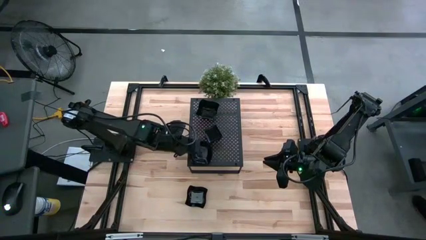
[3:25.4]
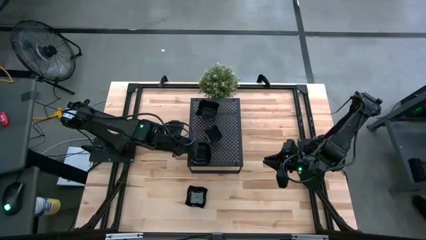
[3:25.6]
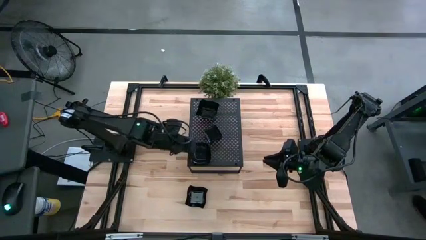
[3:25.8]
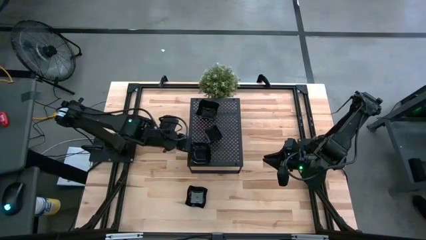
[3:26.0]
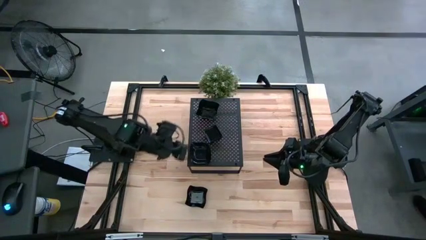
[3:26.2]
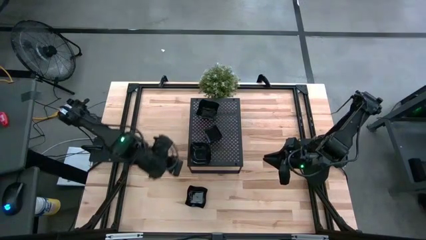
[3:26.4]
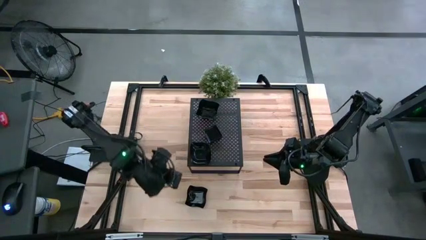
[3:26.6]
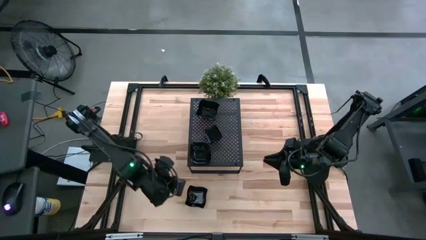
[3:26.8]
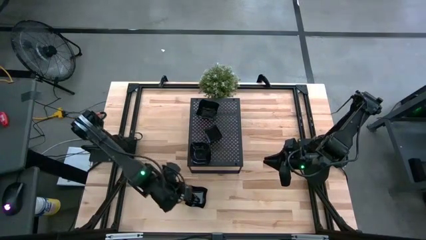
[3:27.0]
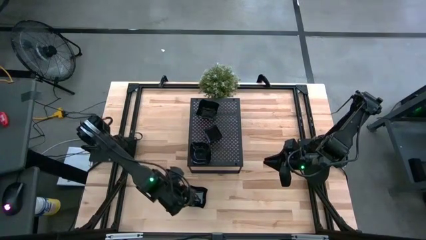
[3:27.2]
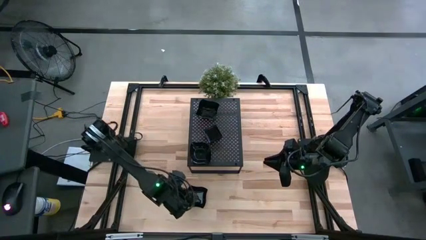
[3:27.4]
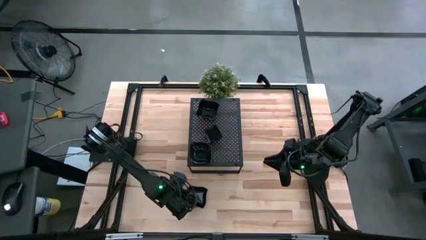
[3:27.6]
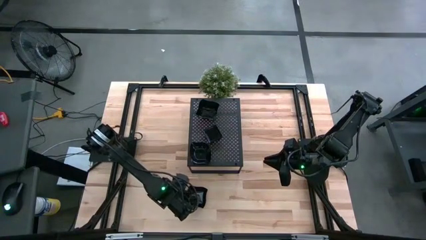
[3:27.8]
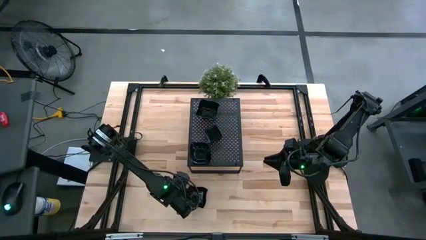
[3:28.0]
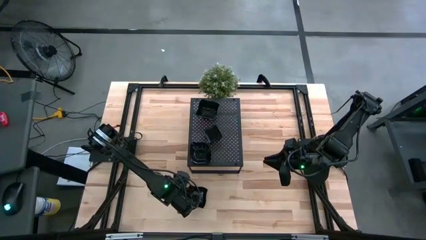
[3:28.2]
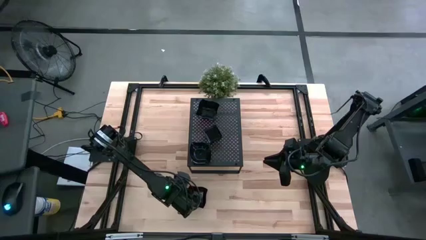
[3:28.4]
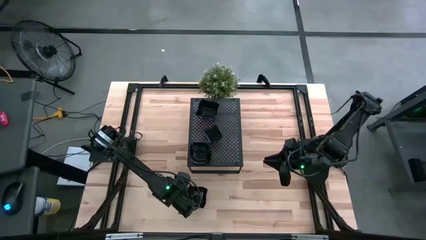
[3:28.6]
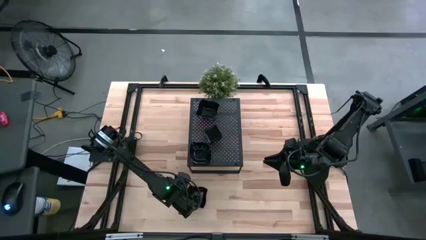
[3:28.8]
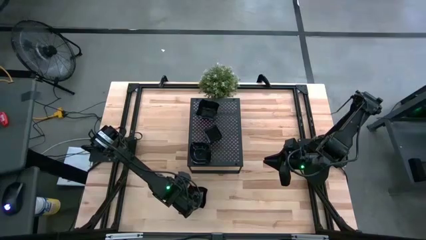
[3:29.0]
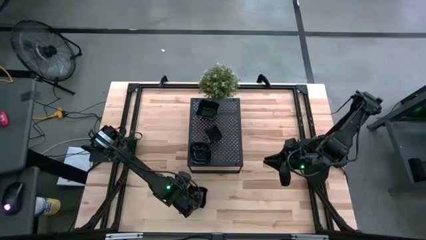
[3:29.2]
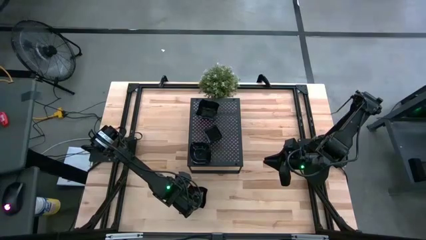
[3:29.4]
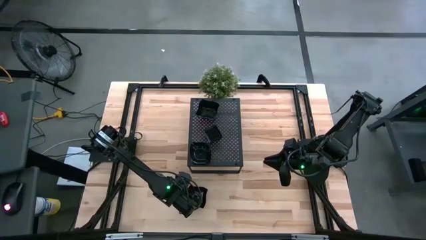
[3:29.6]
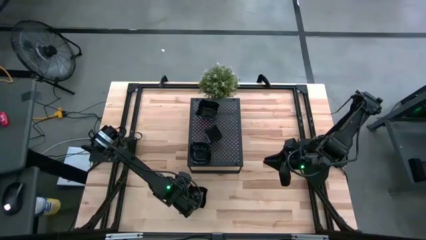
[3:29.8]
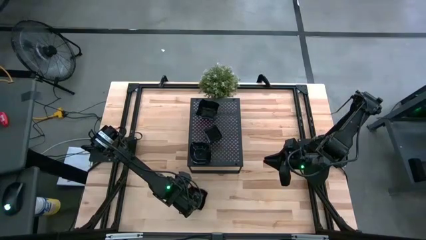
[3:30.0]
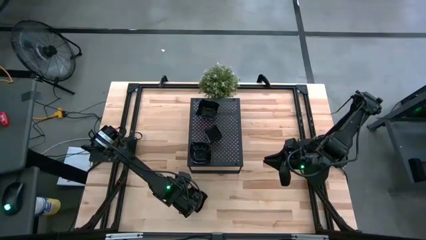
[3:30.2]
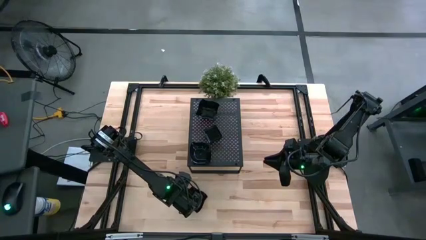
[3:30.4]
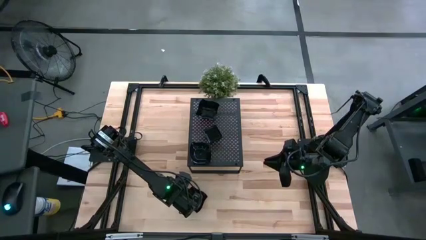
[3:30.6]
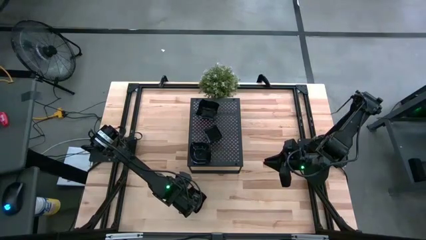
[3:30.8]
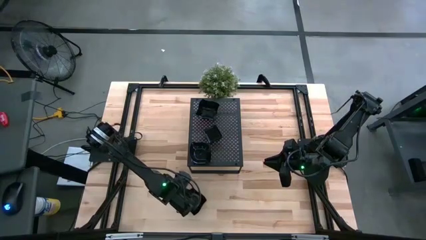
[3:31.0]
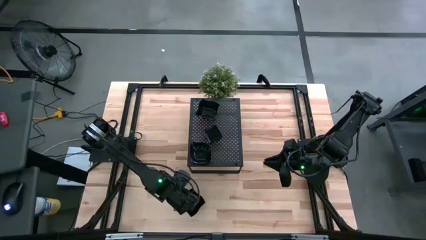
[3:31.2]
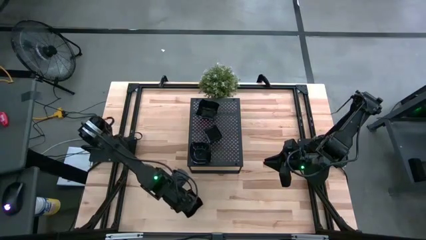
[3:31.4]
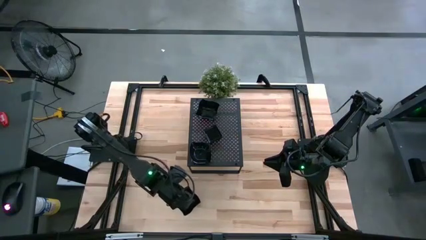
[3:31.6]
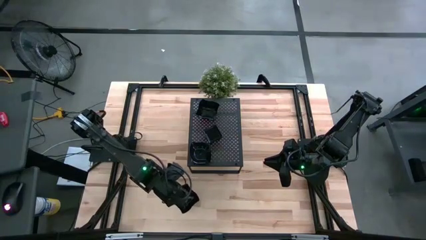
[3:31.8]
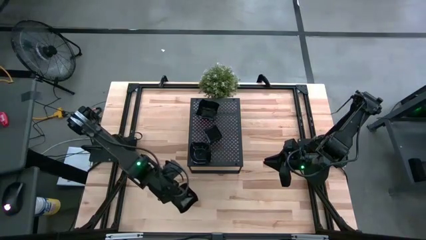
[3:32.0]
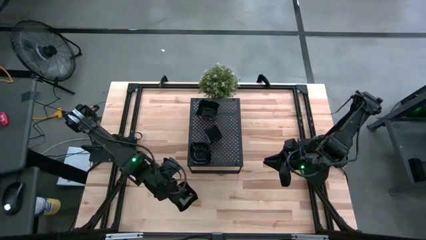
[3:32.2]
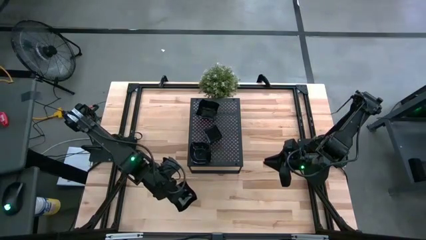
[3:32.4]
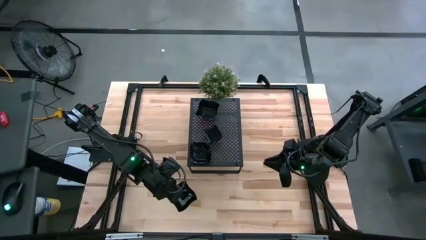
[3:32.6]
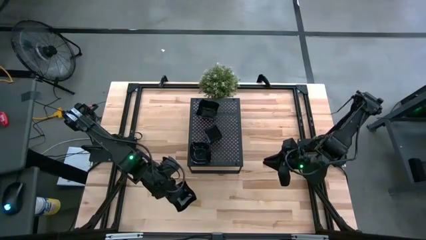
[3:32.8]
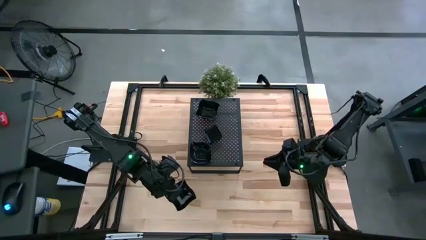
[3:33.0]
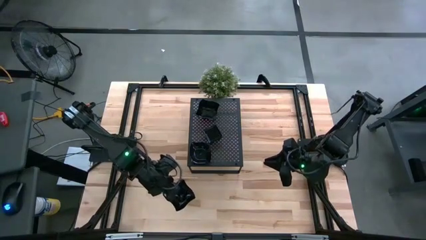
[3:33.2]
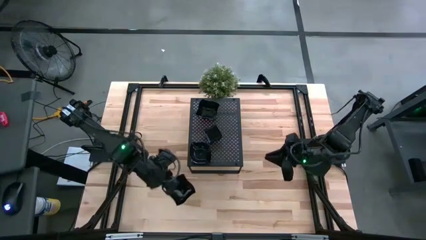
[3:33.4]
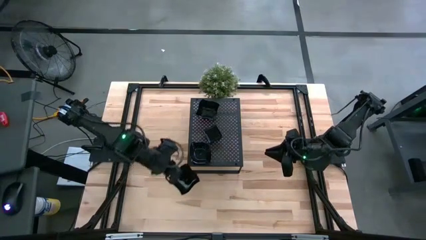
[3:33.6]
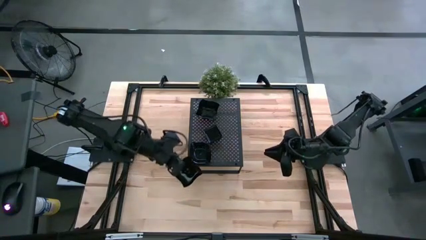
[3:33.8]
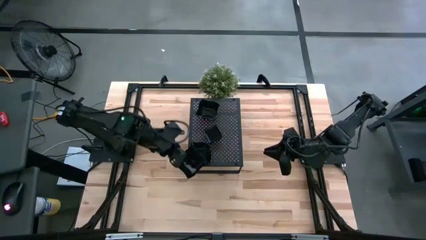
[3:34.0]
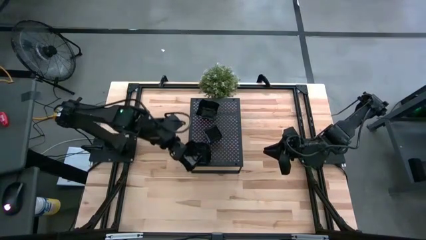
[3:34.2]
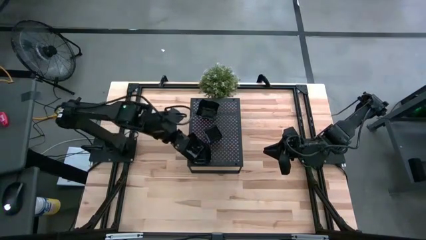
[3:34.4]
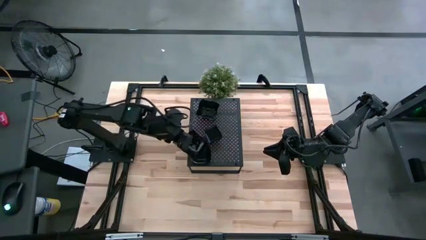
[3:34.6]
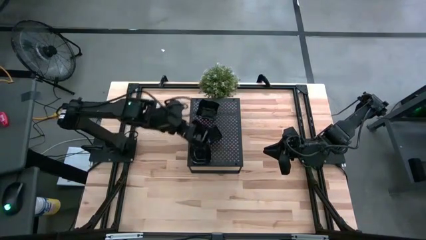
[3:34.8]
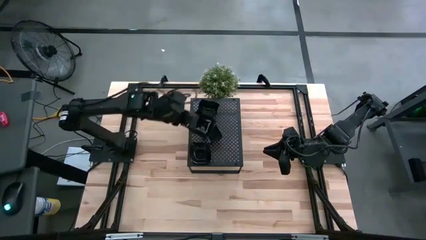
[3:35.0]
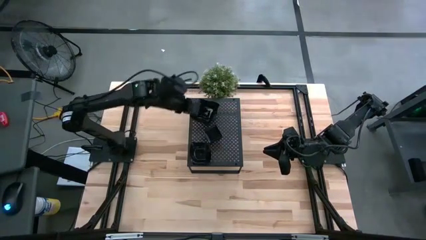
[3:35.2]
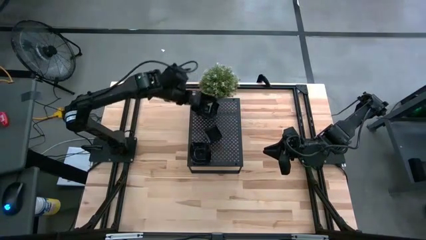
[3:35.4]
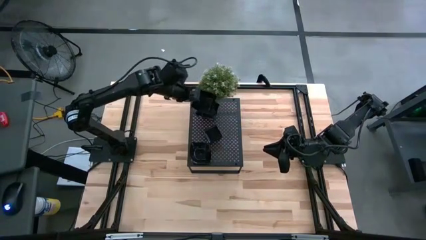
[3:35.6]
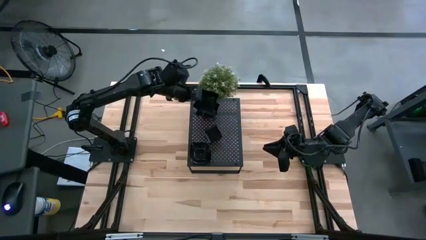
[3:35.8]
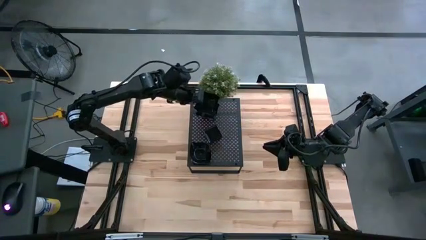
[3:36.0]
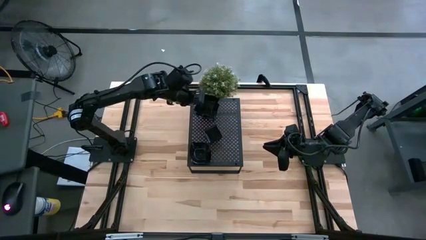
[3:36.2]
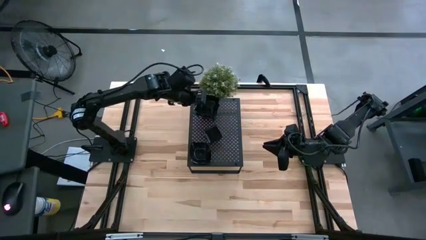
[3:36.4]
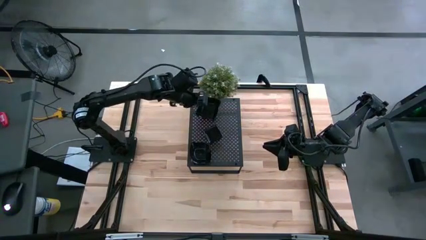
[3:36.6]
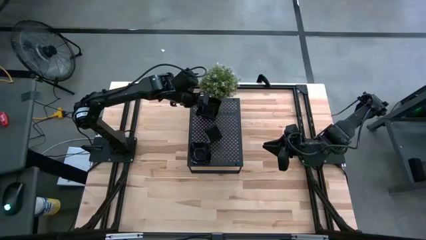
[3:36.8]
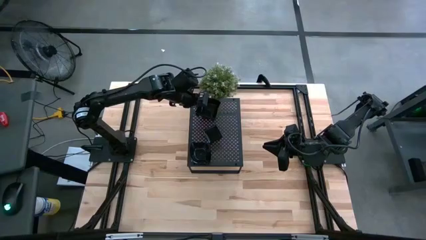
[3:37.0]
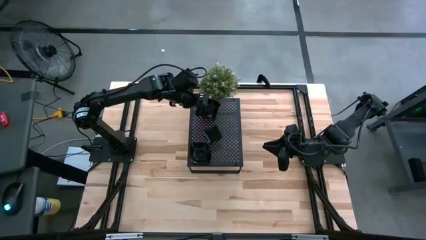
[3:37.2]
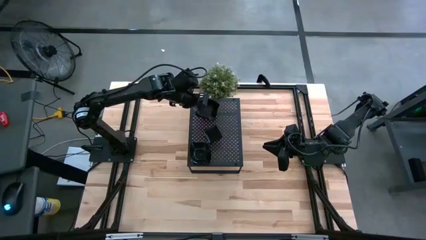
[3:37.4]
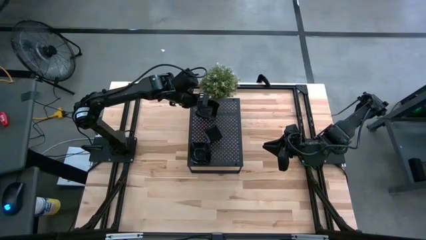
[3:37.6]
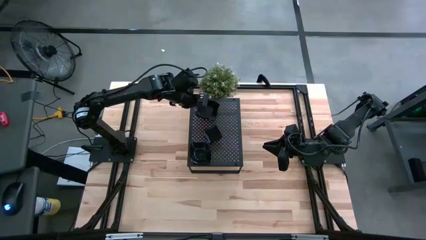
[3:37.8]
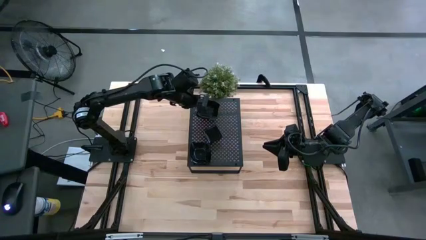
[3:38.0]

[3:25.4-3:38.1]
Task: Pick & Place Mini shaped plates
Stack the distorted square plate on top of the distorted square plates on the shelf

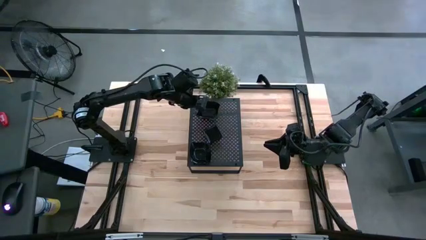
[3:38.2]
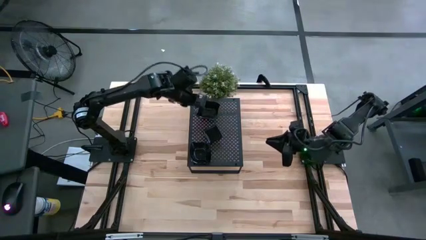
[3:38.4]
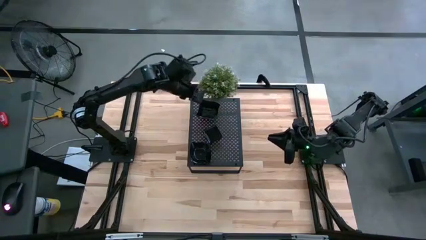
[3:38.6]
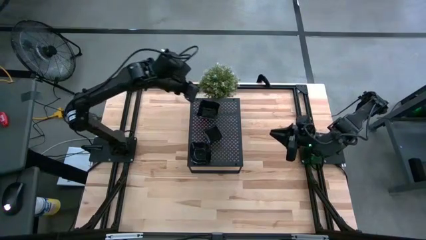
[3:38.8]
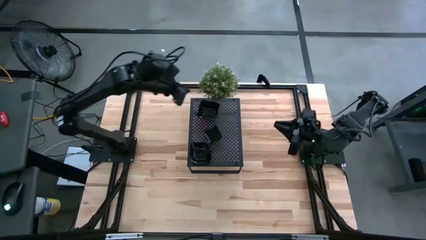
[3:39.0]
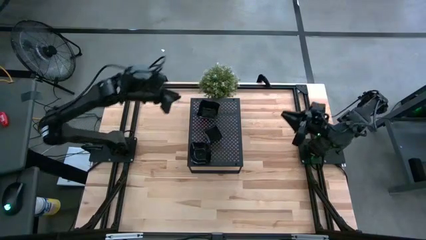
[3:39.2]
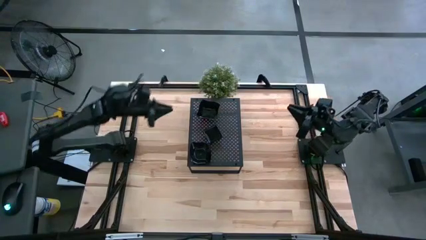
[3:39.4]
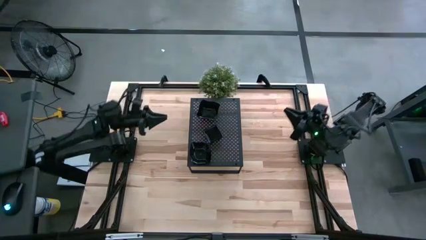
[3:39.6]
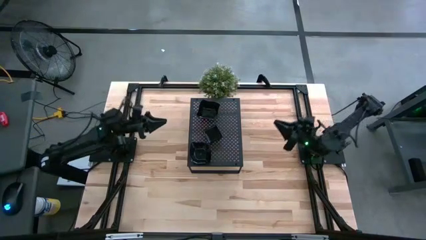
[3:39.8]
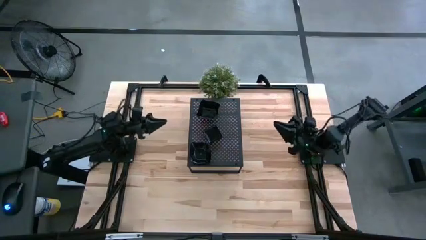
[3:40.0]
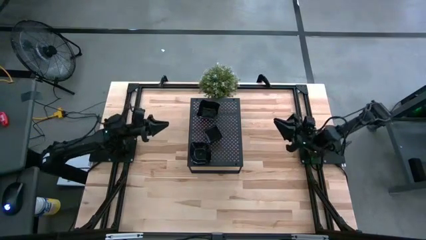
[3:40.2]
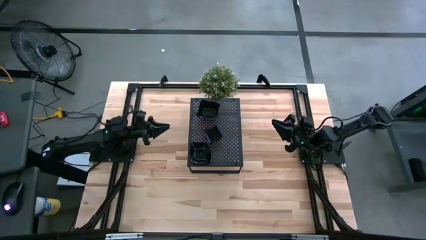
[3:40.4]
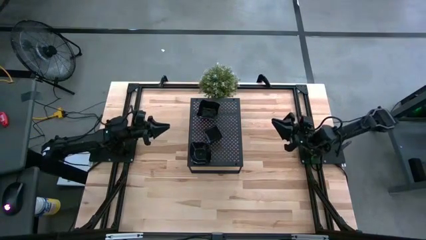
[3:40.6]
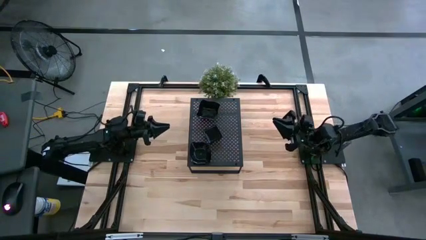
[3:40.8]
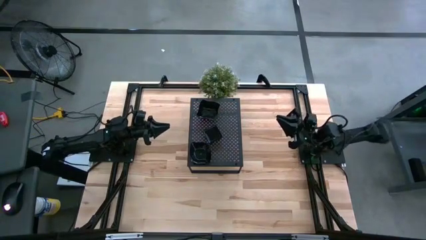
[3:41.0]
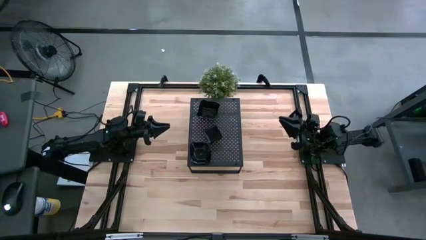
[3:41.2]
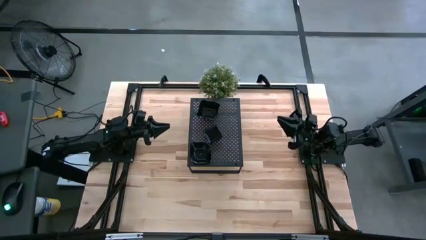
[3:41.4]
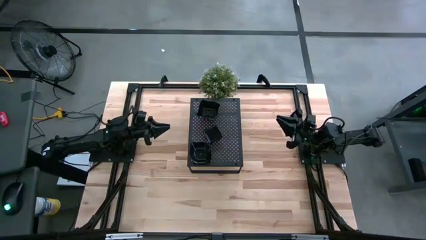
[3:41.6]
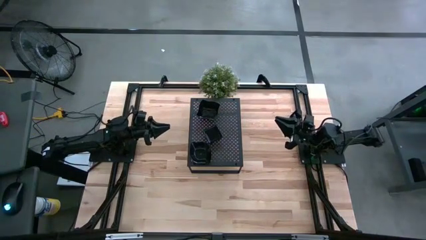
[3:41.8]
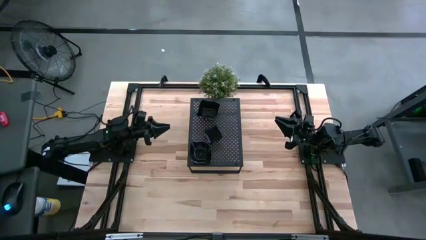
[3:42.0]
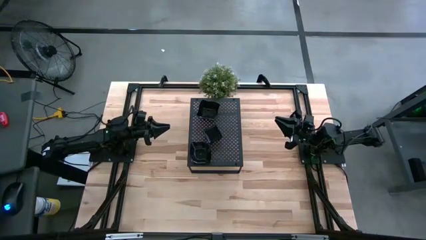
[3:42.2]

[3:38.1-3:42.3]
Return to Home Position
